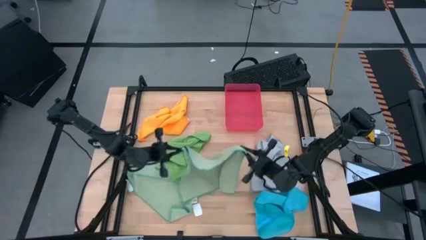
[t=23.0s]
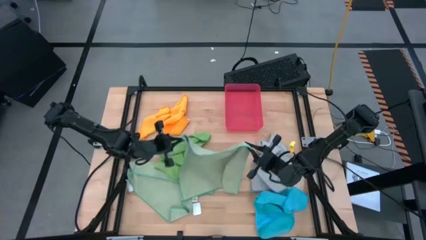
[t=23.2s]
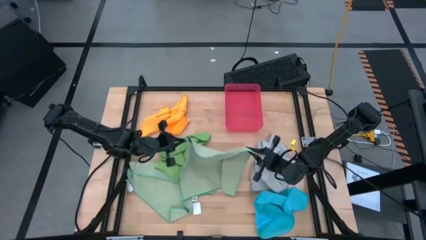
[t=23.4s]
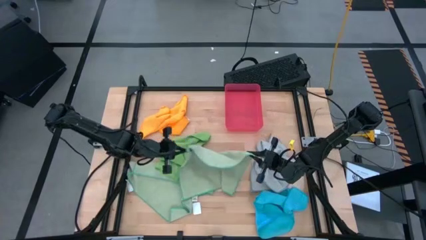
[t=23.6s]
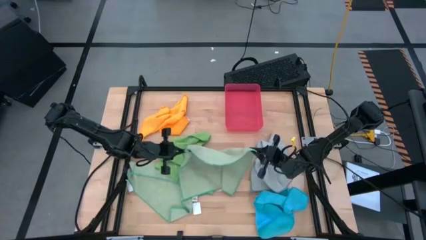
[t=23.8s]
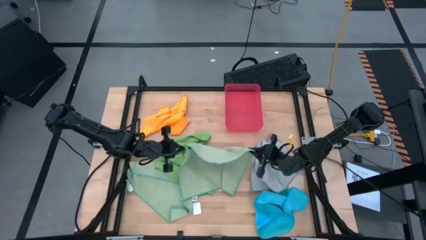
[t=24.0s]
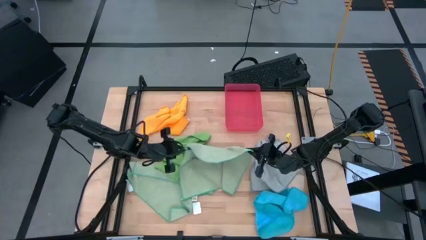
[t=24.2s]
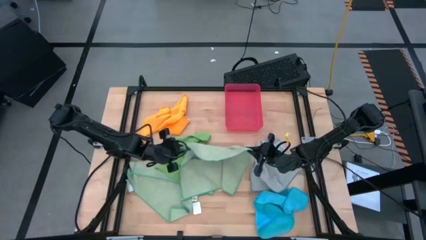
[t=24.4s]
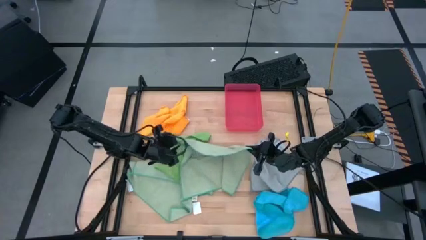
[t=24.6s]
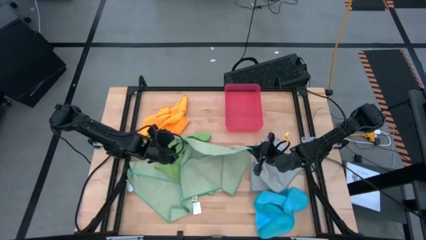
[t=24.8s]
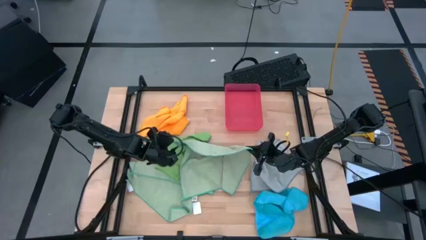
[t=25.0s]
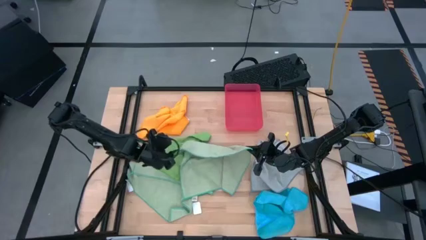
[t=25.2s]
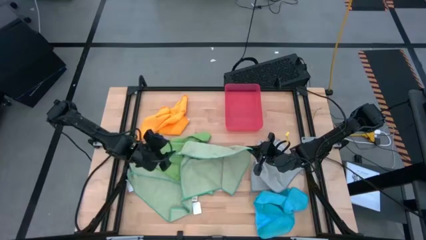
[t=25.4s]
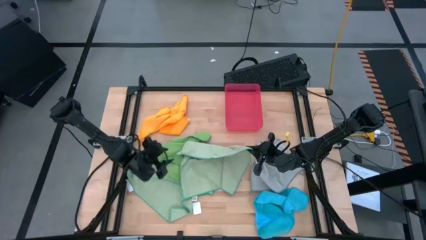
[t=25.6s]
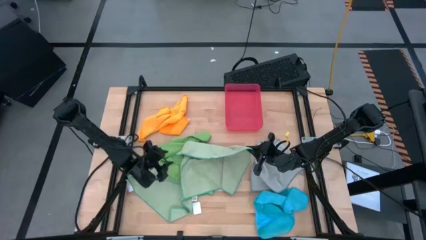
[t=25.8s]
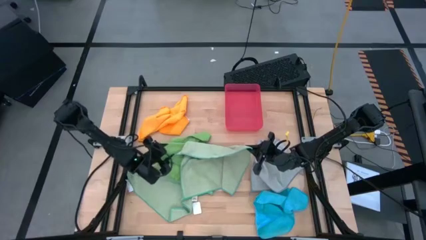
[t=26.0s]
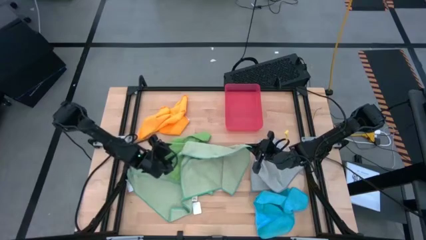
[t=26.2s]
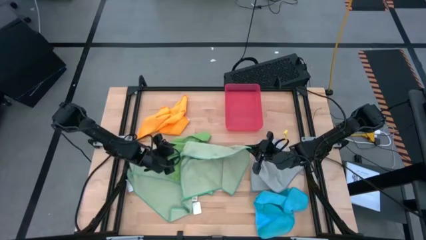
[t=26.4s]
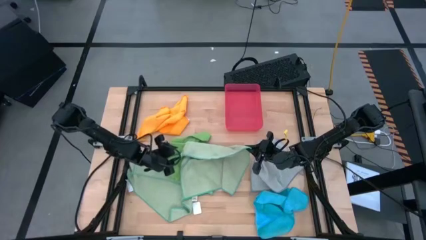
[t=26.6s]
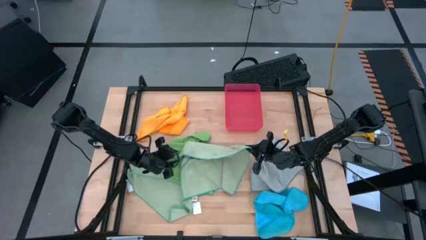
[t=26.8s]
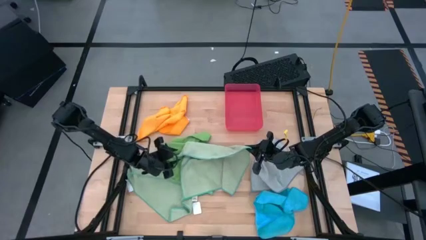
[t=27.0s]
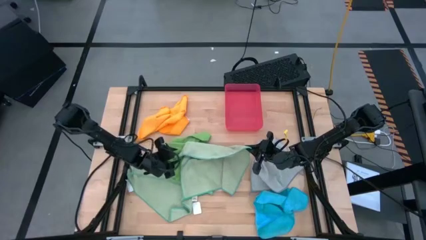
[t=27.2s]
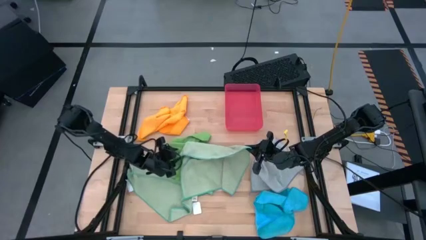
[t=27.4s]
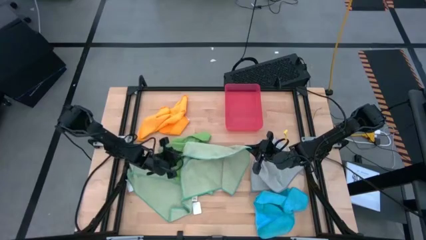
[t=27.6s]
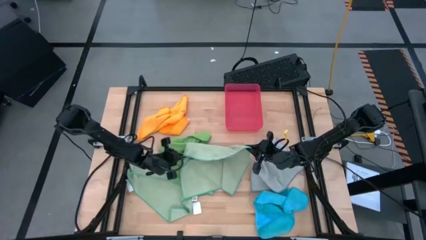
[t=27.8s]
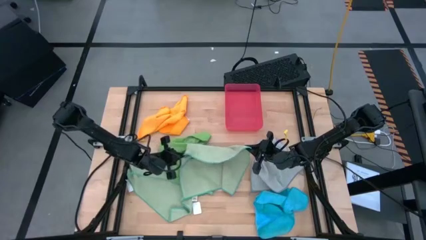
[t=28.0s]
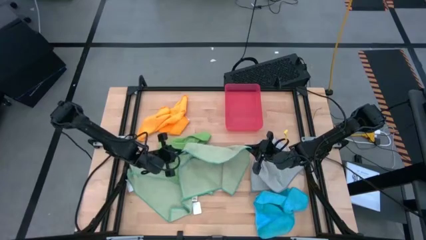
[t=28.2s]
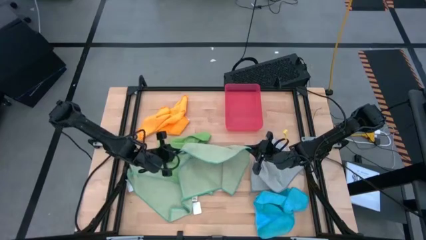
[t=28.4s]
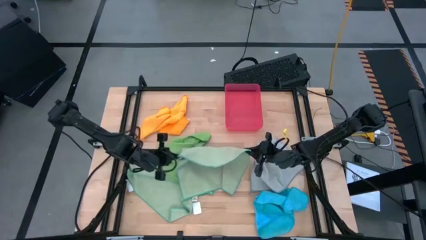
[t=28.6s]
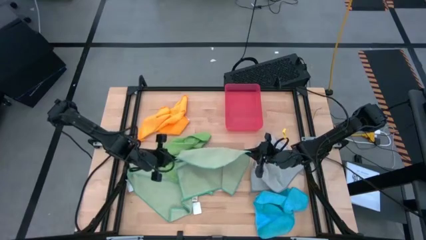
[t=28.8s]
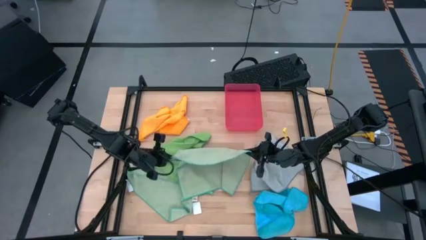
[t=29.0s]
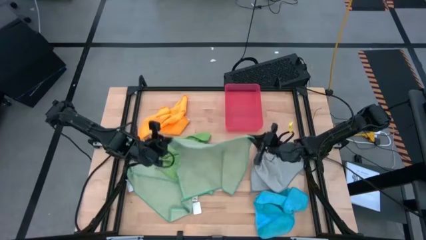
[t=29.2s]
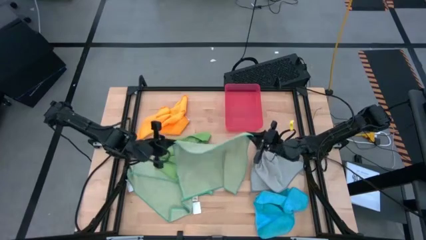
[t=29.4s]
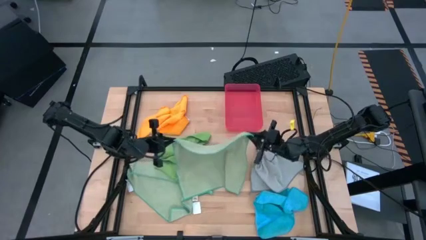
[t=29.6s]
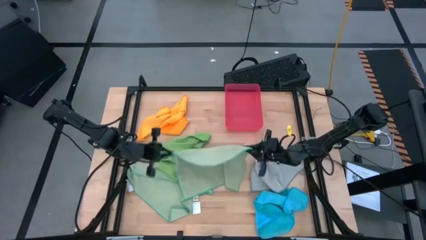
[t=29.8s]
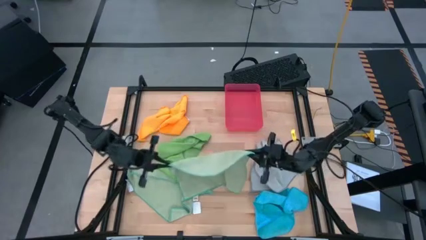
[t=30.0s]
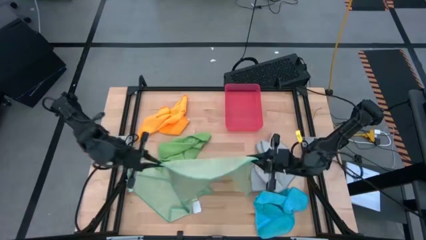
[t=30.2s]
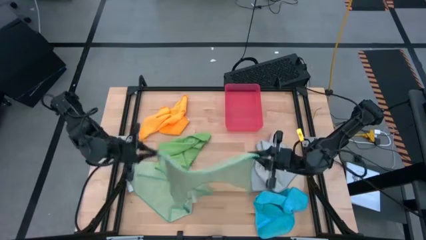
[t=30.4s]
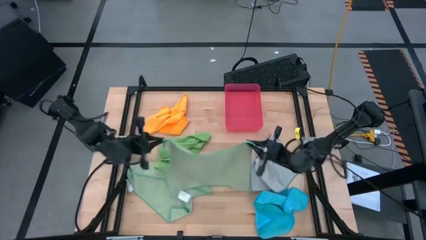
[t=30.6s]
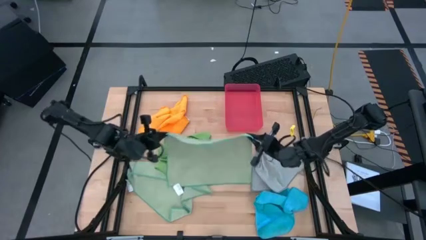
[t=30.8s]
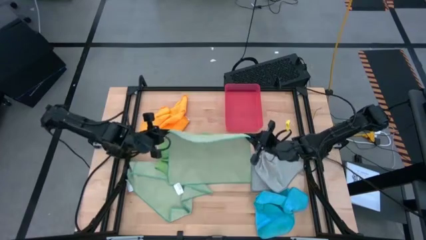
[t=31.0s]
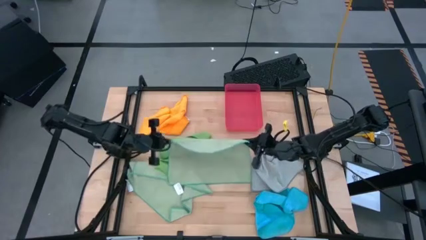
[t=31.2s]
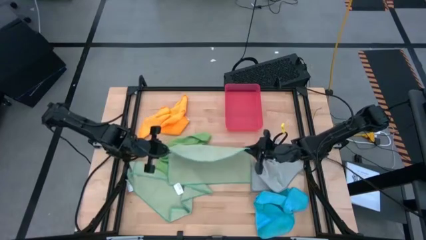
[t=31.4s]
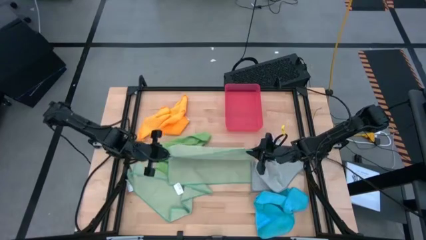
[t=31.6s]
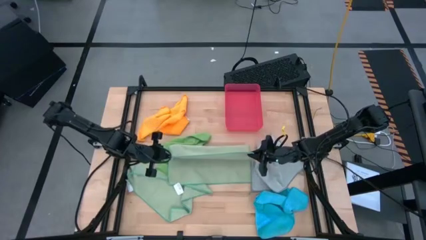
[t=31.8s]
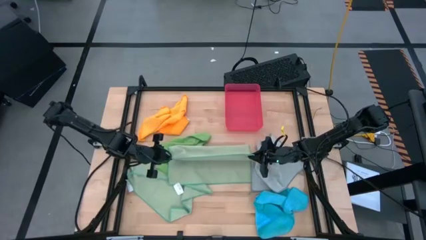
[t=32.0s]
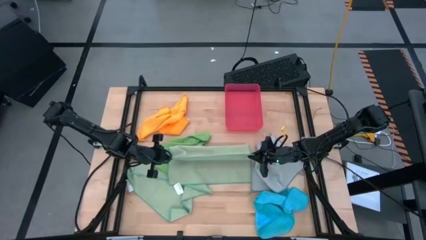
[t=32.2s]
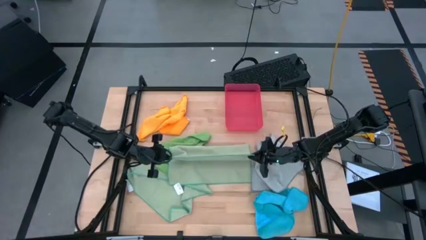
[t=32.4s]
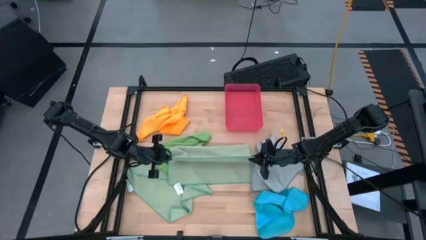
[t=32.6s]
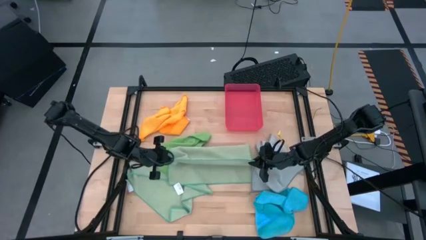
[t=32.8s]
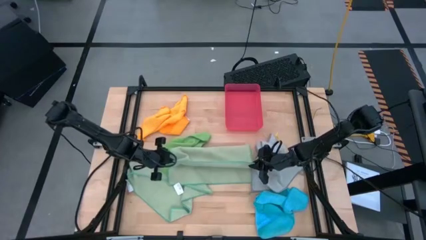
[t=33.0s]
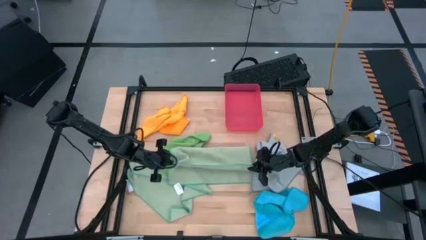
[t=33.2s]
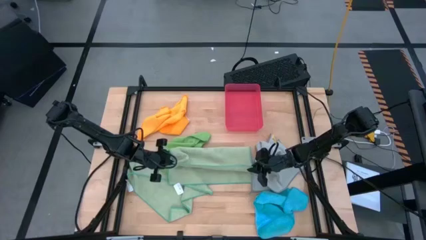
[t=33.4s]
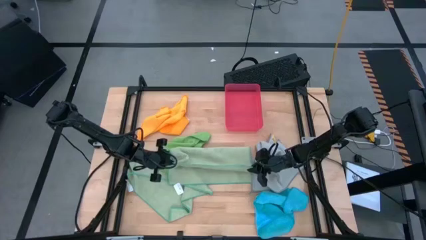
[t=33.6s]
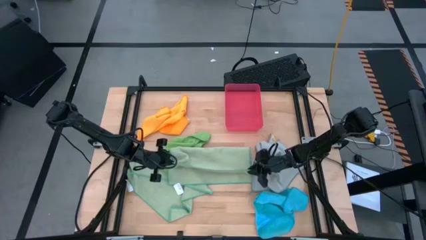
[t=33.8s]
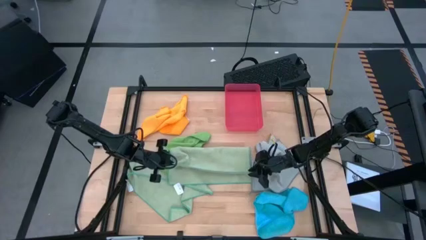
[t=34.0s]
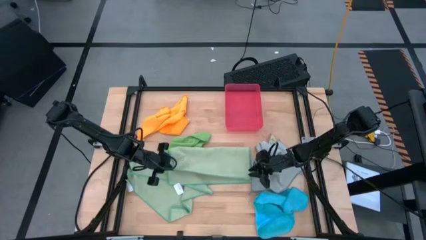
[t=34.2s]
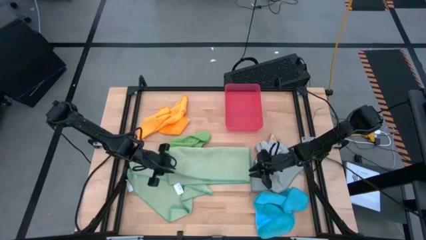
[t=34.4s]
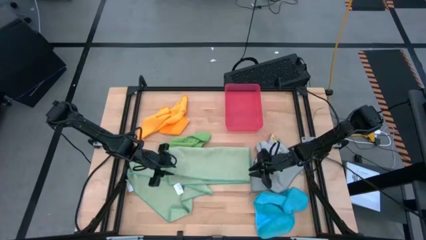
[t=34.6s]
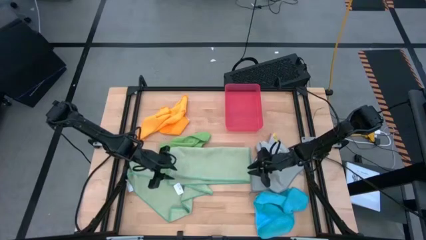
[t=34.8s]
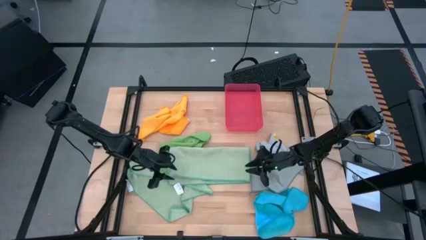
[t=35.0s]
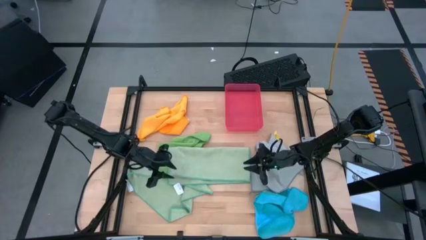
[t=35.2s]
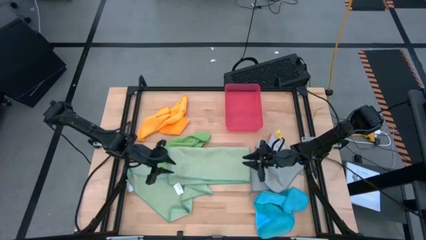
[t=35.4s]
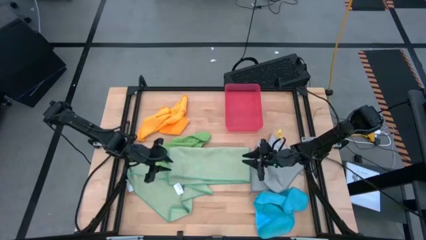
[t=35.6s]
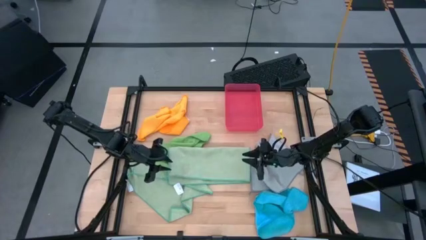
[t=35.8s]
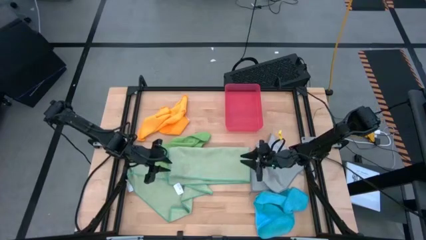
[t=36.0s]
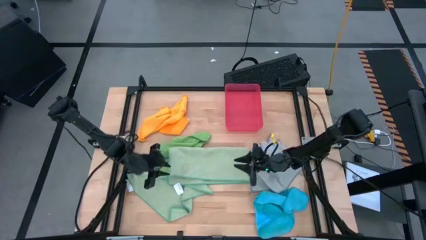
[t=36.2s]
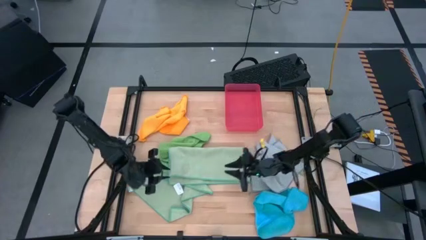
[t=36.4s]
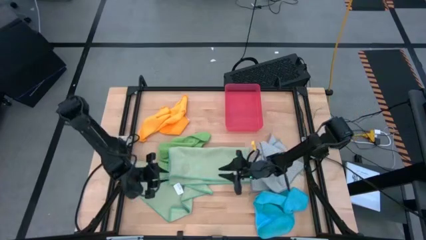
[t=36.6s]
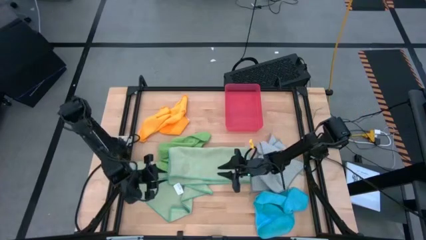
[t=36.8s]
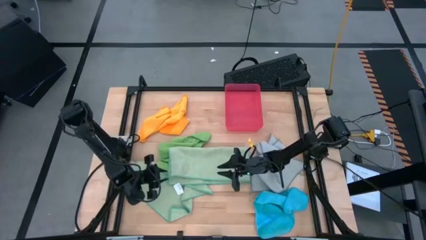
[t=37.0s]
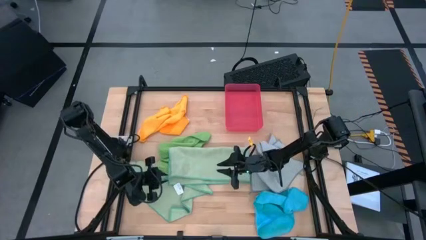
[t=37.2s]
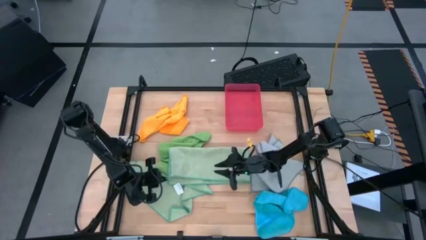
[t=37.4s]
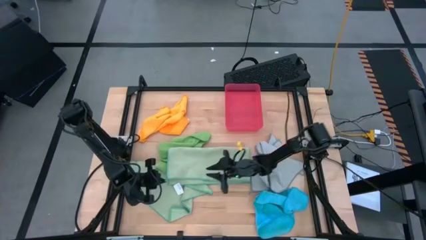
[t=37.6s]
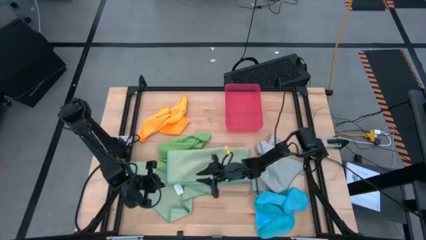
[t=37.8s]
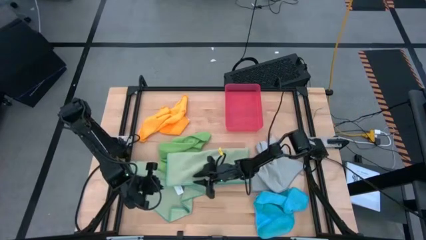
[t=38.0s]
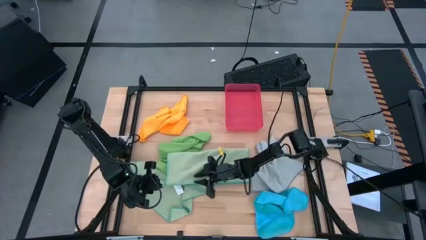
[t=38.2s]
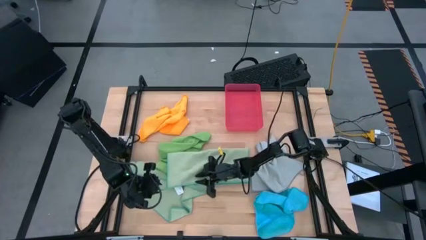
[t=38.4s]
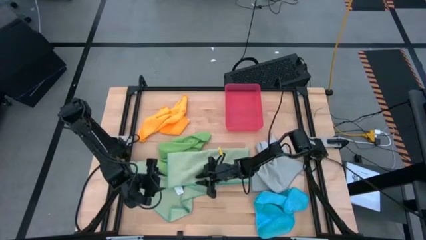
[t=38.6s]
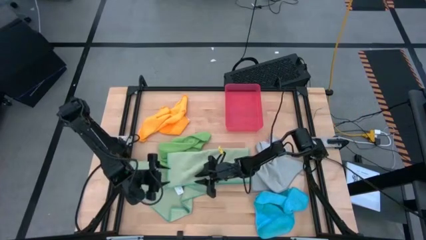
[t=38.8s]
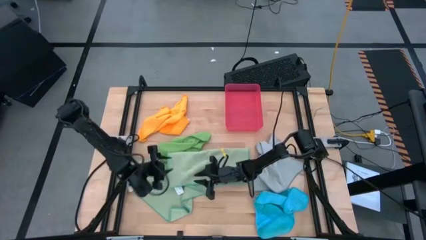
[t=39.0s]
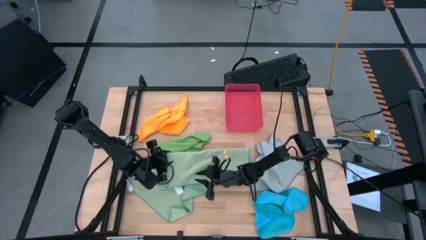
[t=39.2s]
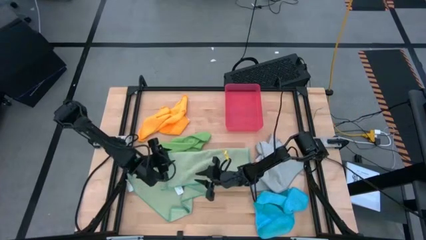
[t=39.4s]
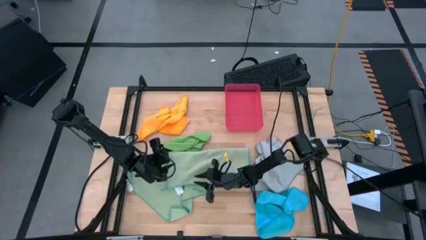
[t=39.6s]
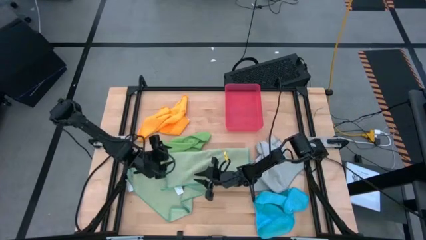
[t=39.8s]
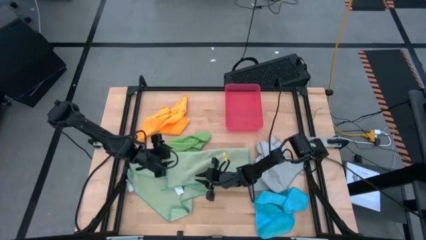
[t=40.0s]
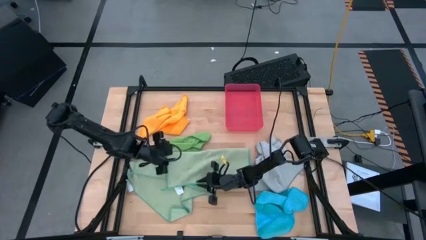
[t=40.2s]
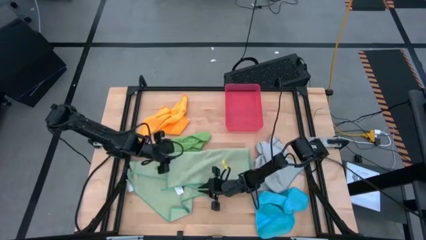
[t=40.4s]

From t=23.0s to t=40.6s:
Task: Fold microfiber towels
Fold the right light green microfiber cloth
